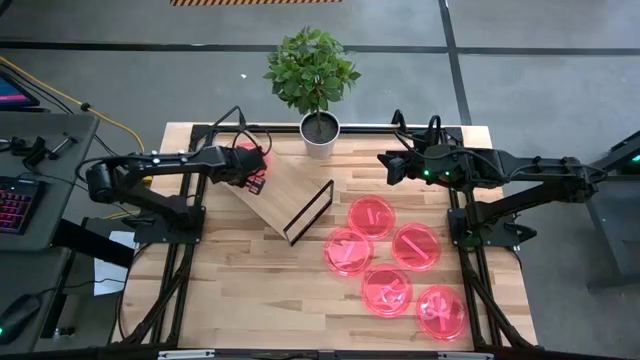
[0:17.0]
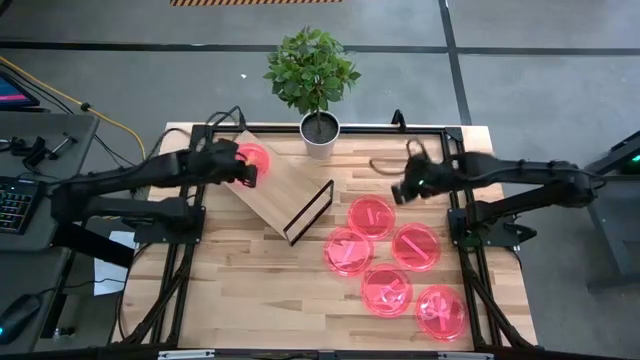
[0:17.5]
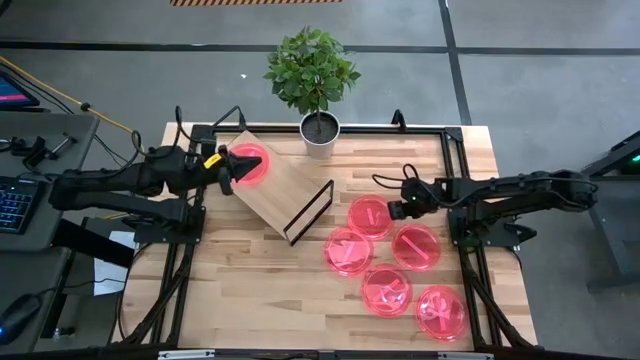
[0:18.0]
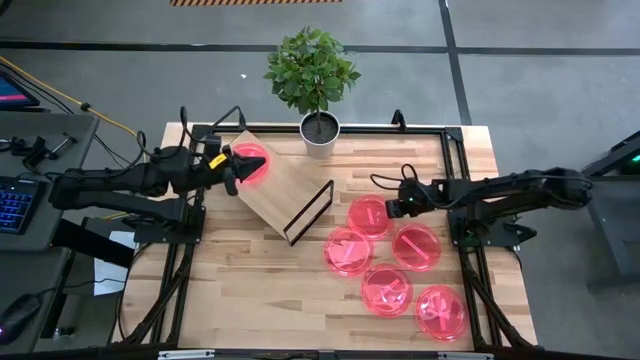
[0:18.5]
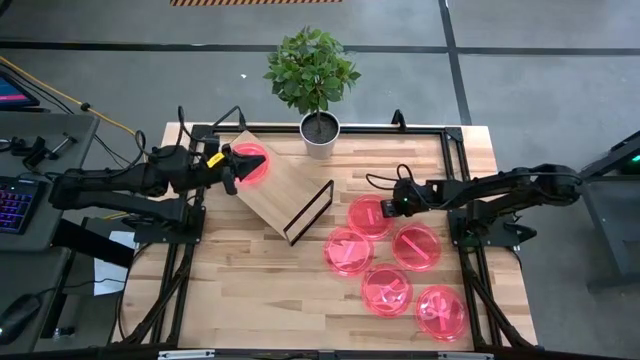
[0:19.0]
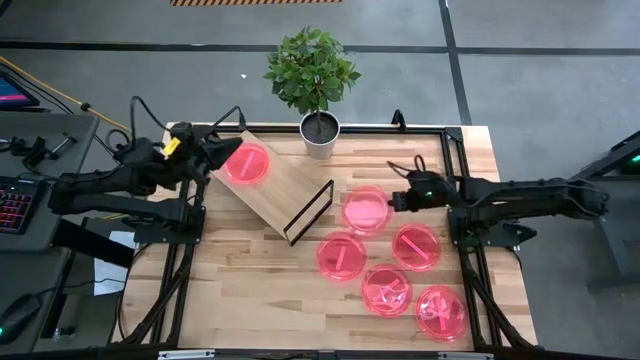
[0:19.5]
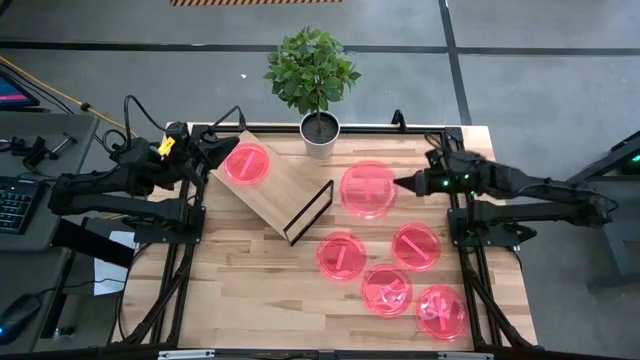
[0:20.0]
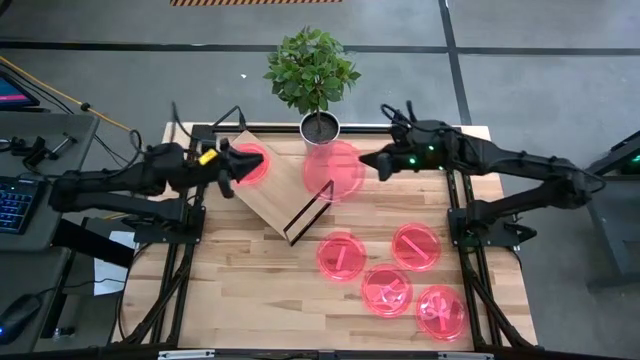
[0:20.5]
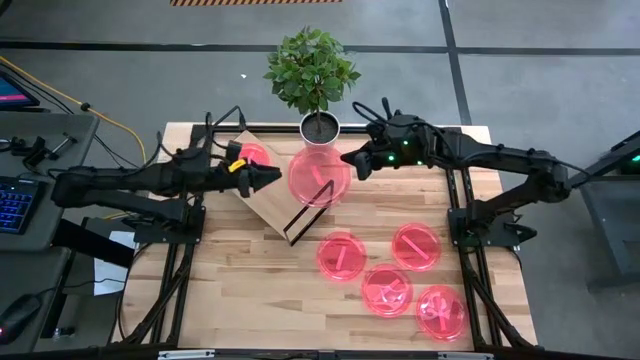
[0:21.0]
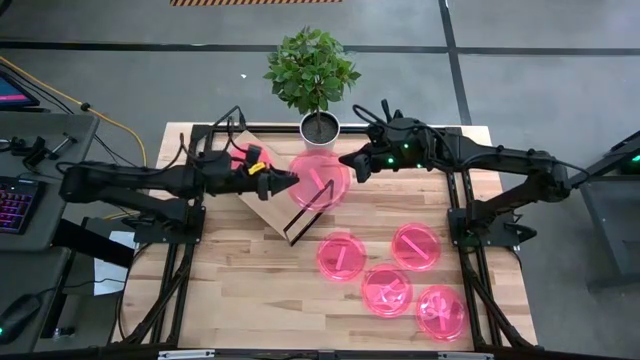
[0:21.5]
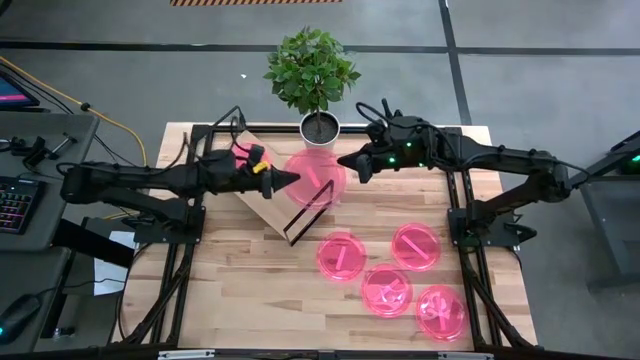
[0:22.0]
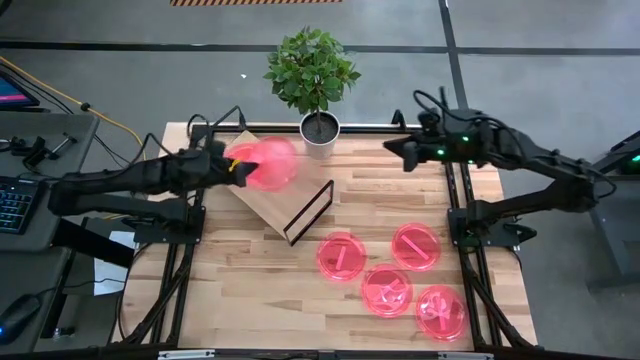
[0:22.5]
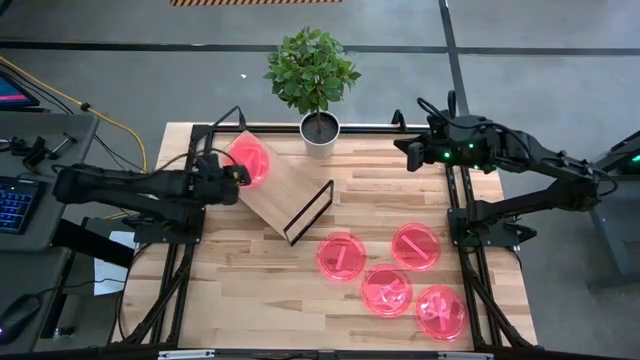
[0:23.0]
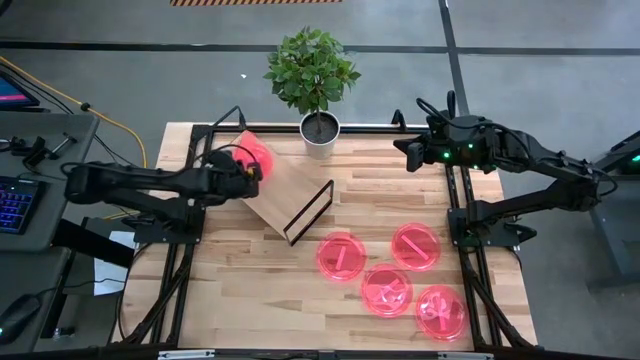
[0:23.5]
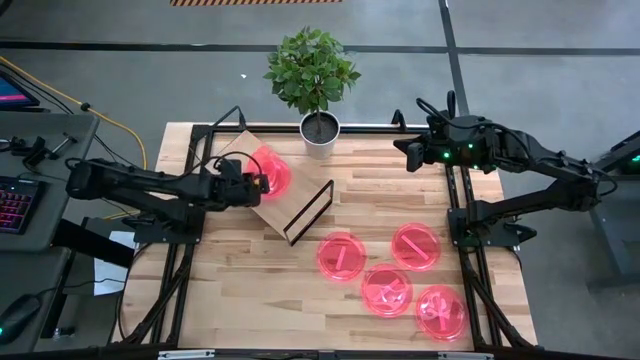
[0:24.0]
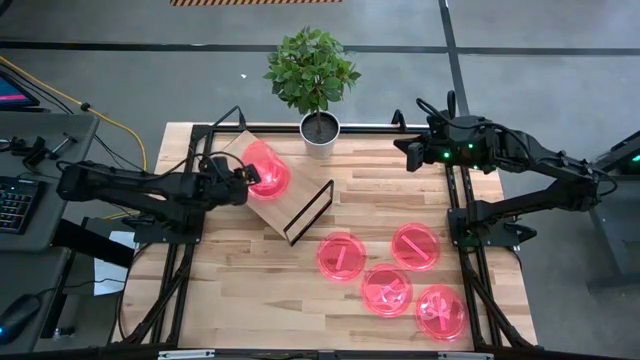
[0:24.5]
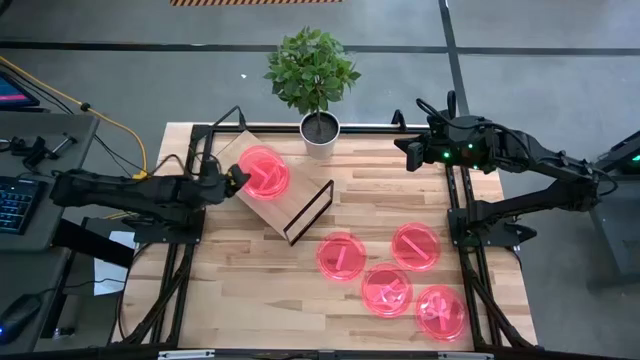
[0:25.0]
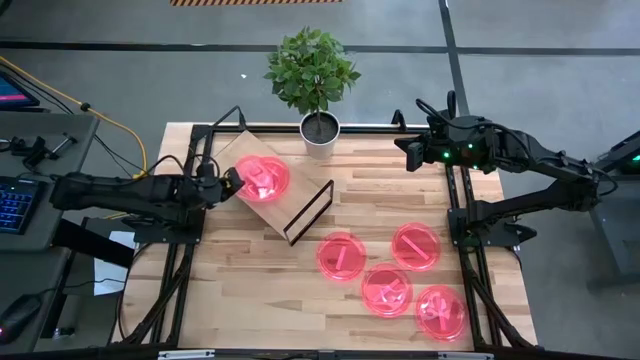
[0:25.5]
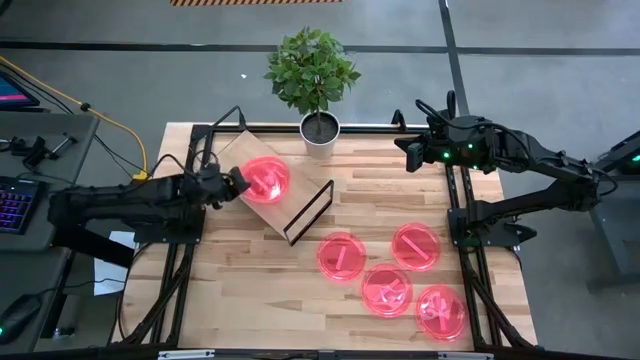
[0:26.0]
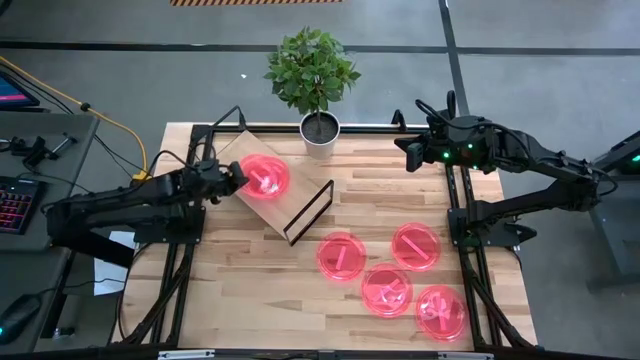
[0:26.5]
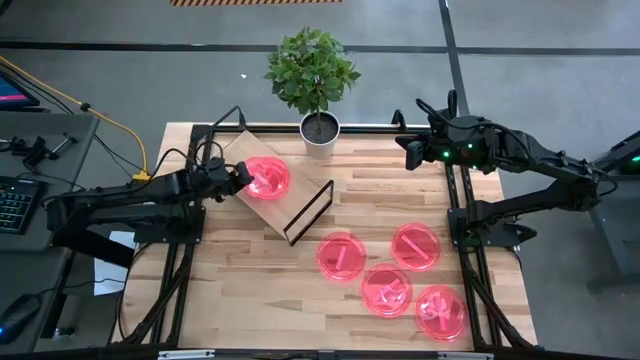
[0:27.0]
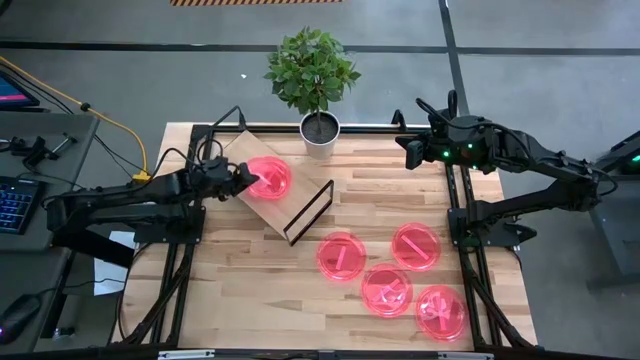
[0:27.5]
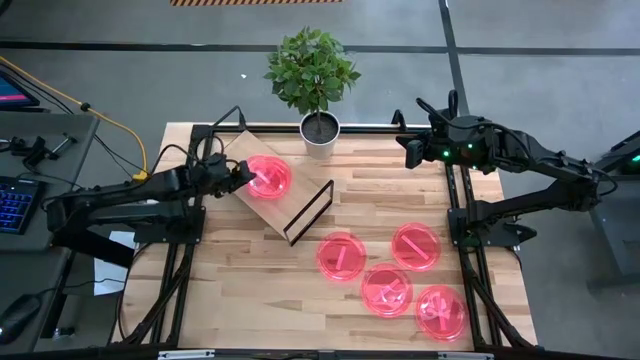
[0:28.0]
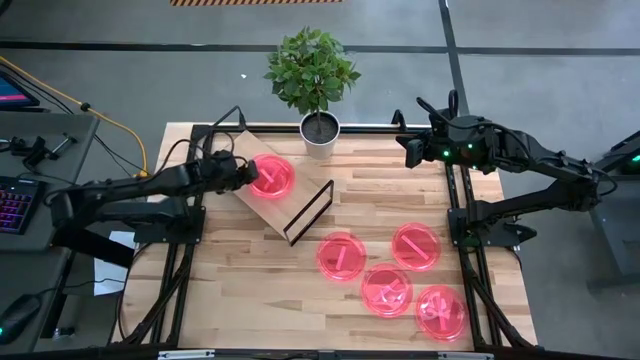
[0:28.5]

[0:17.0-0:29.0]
Task: Place and stack plates onto a shelf
Stack the pink plate on top of the pink plate on the shelf

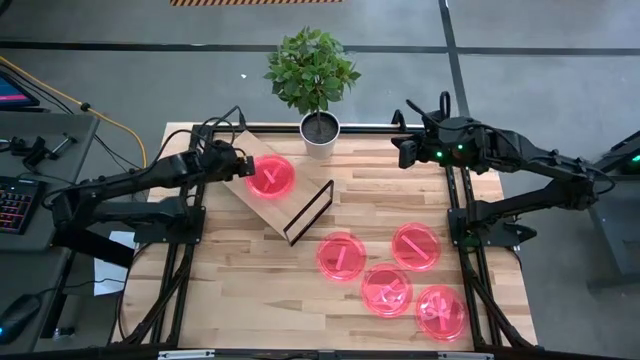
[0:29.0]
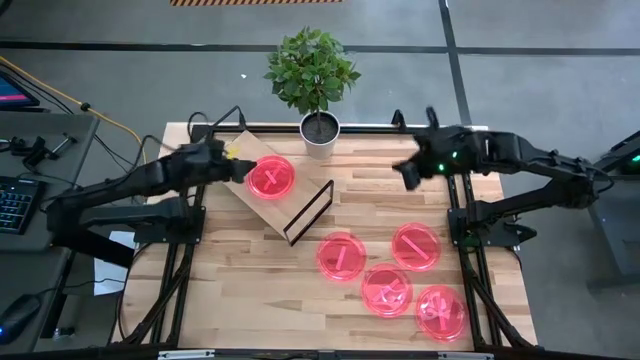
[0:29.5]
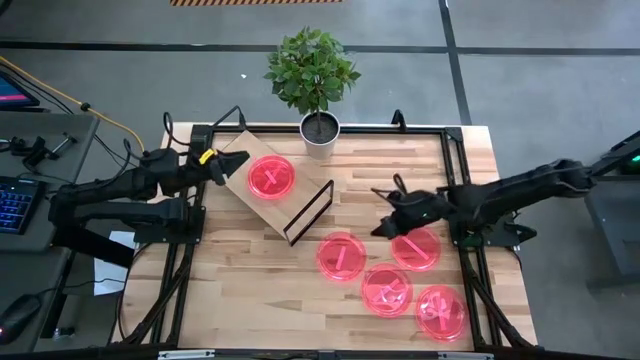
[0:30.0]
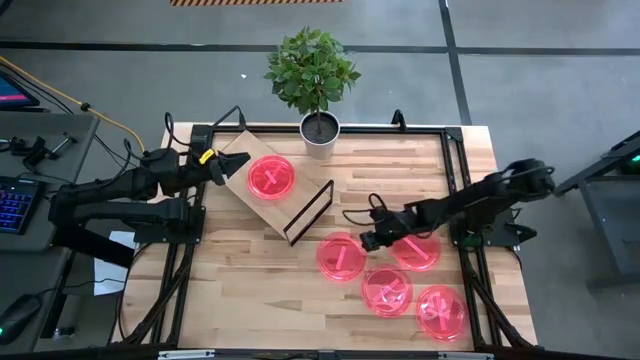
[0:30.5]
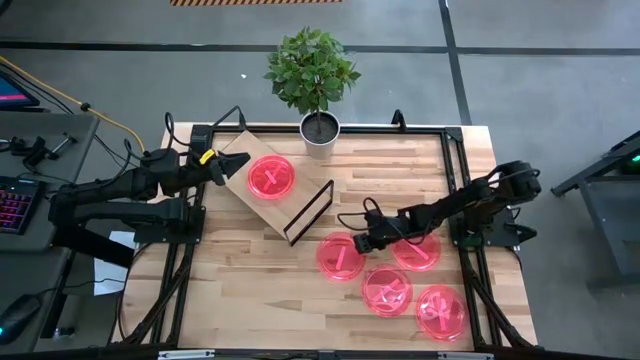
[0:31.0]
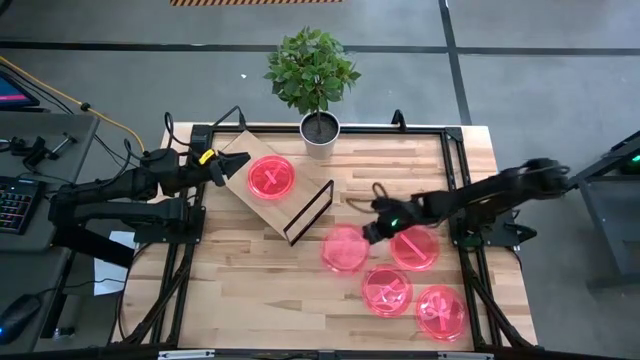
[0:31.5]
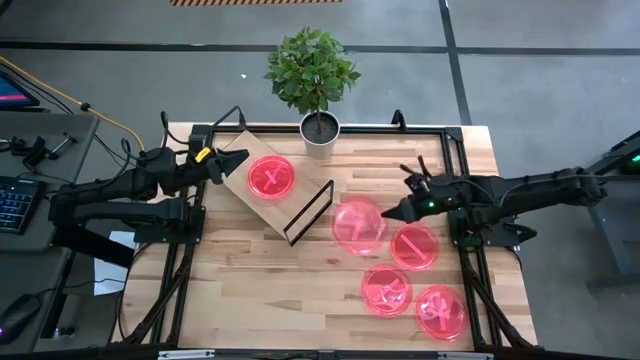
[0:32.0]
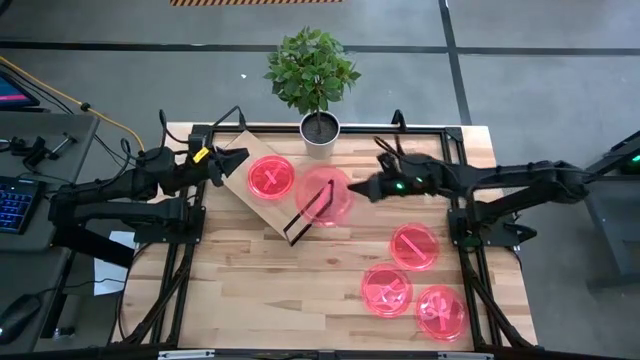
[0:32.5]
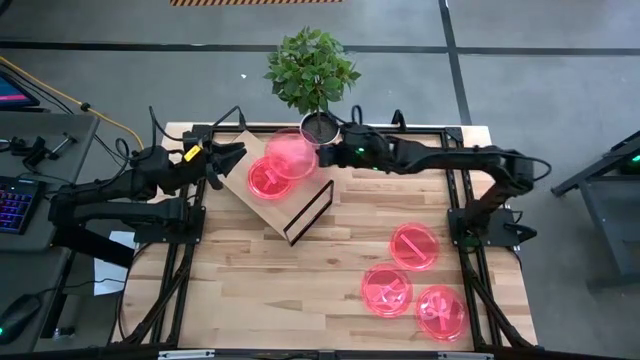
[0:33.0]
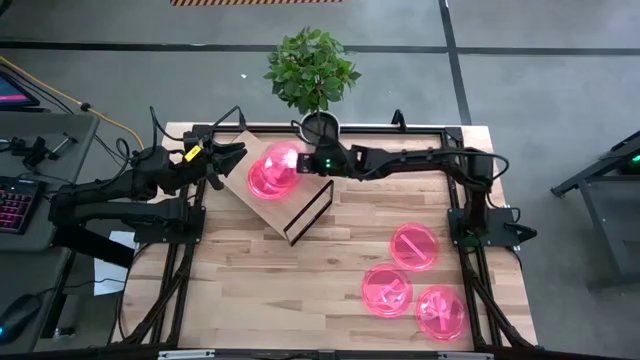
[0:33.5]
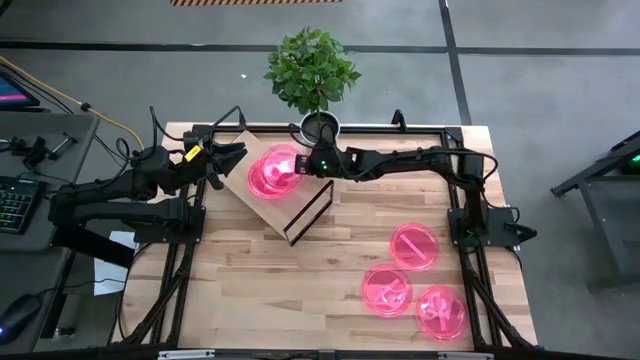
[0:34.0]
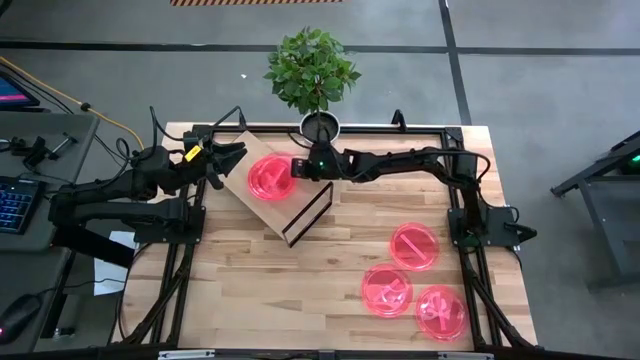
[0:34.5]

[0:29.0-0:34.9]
Stack the pink plate on top of the pink plate on the shelf

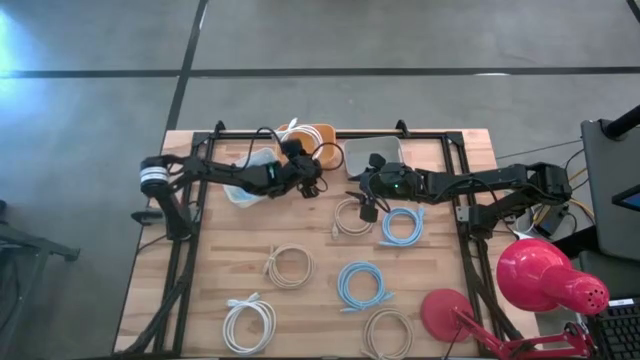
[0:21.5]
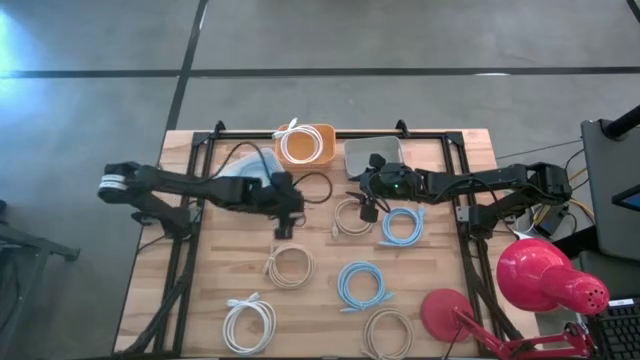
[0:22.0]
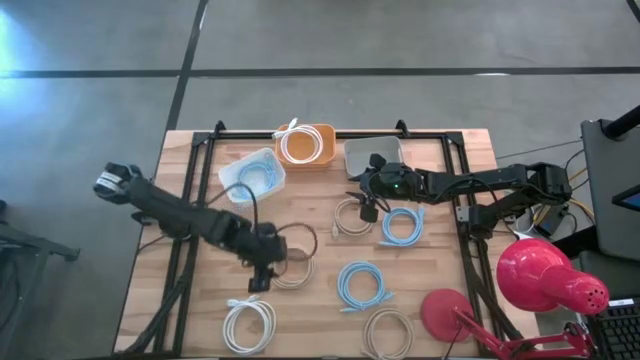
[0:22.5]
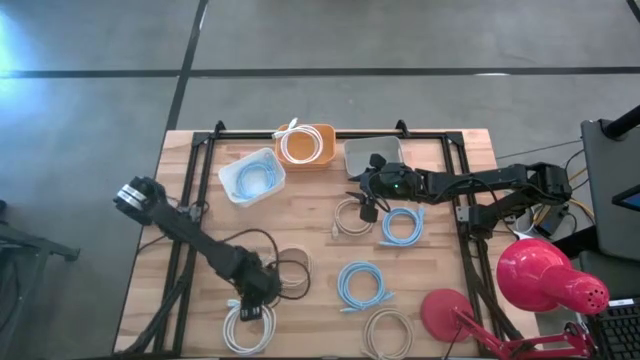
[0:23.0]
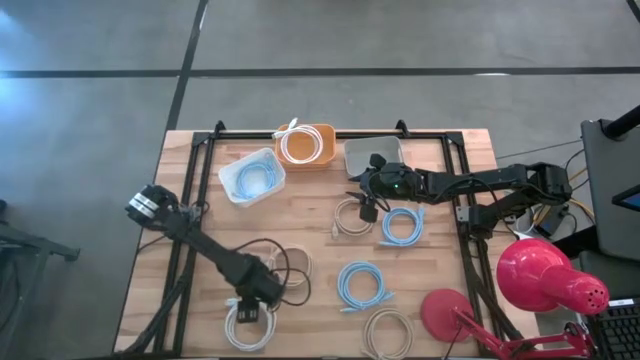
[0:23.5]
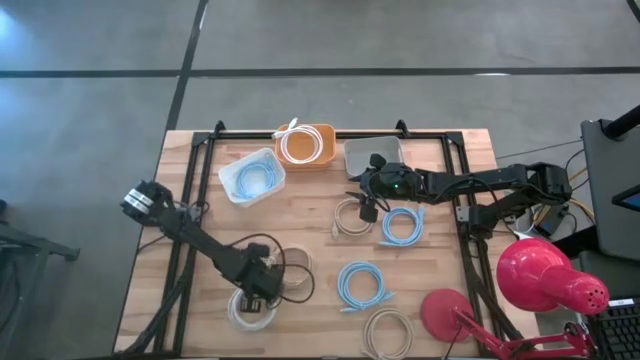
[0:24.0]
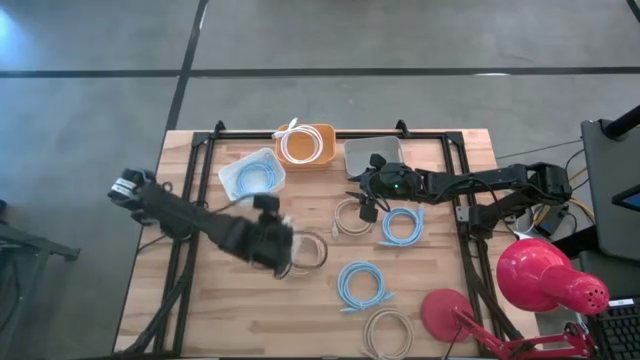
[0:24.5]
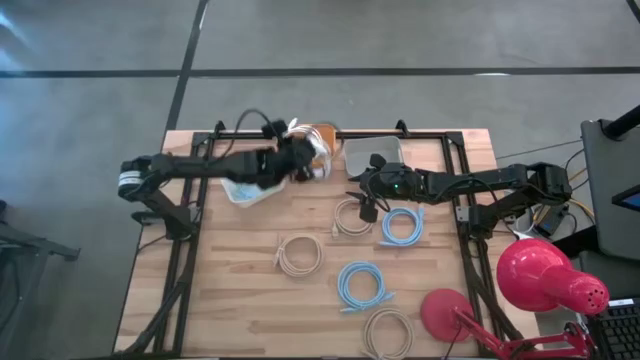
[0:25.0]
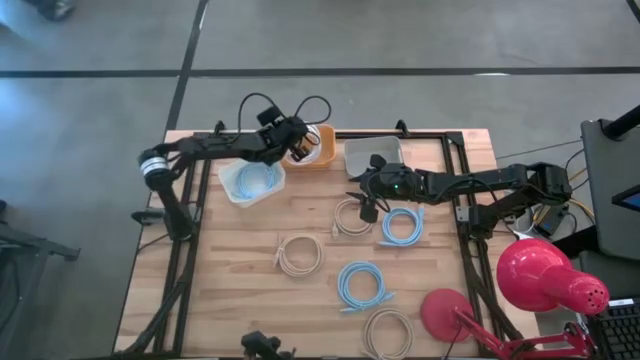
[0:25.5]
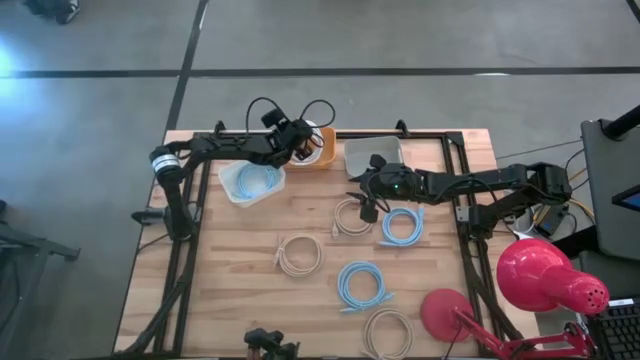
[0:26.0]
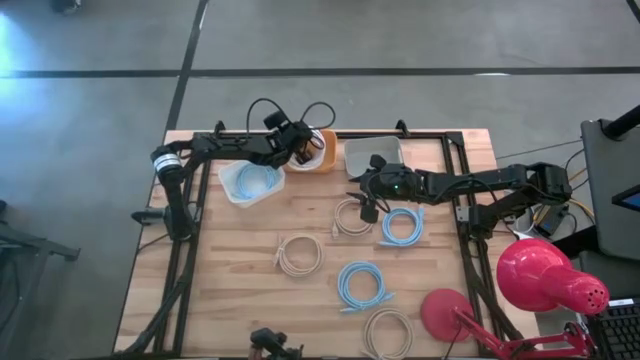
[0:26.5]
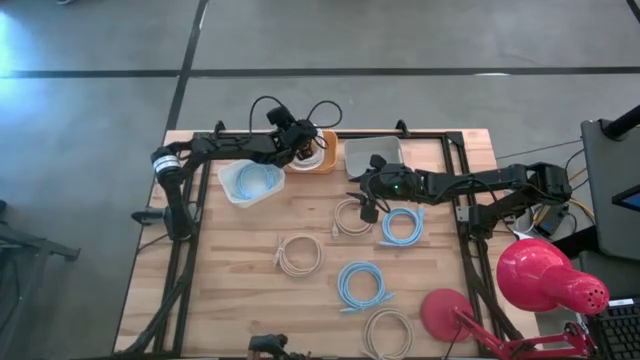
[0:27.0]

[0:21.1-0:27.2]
Task: Sort HDMI cables
Put the white HDMI cable into the yellow bin
